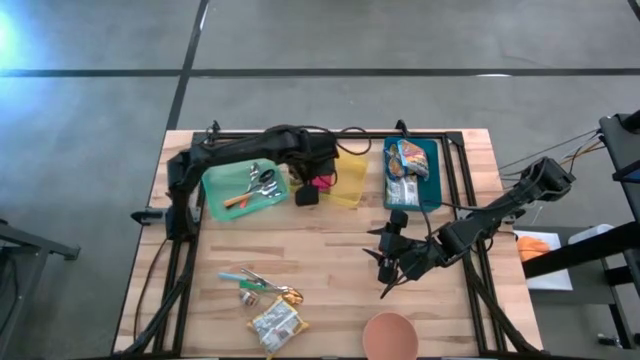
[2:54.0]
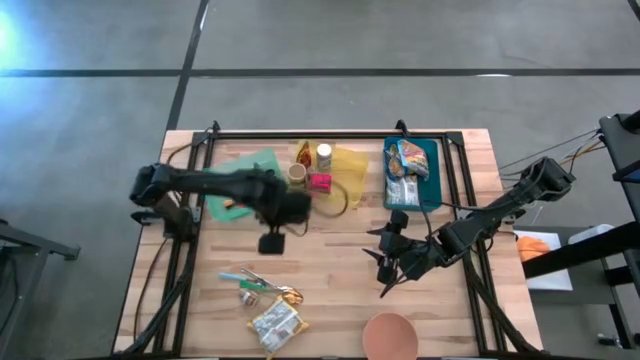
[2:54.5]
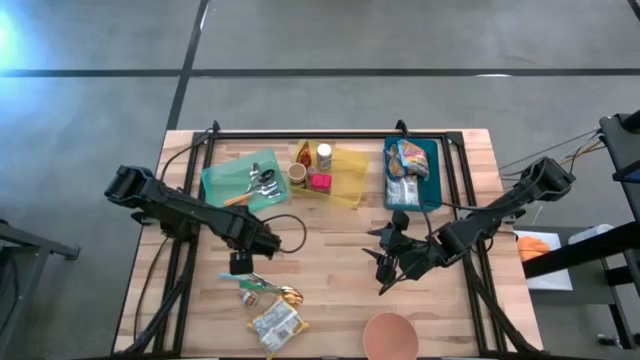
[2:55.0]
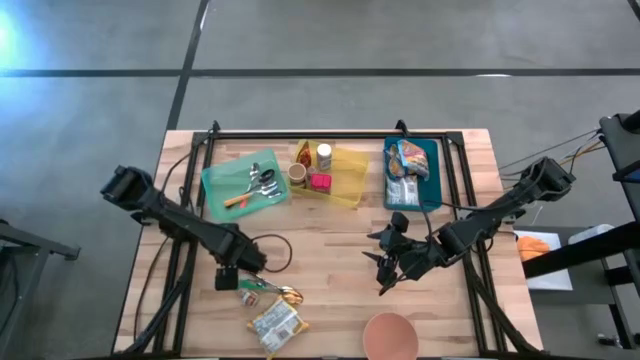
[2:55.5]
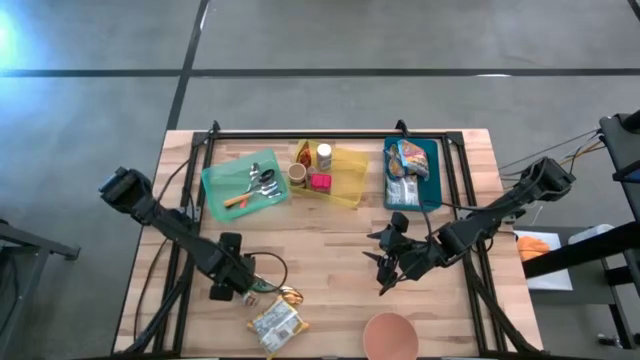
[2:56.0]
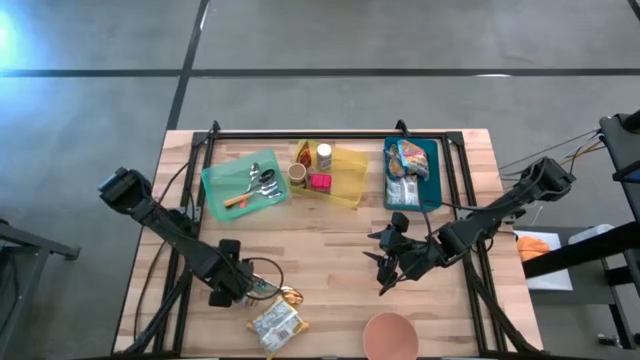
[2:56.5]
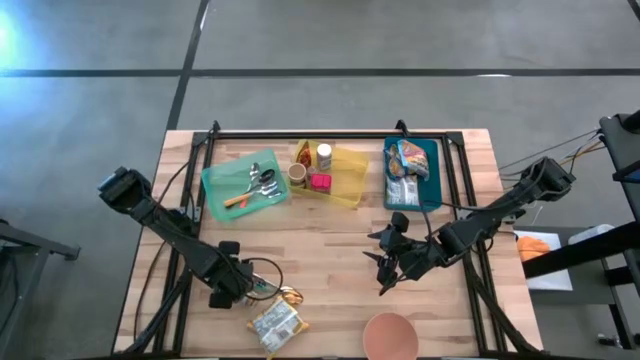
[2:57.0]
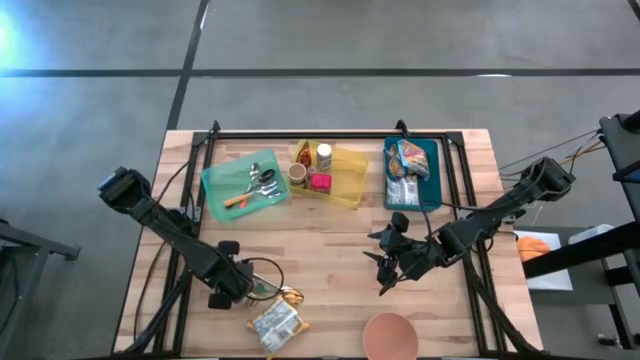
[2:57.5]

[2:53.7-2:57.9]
Put the blue spoon into the green bin

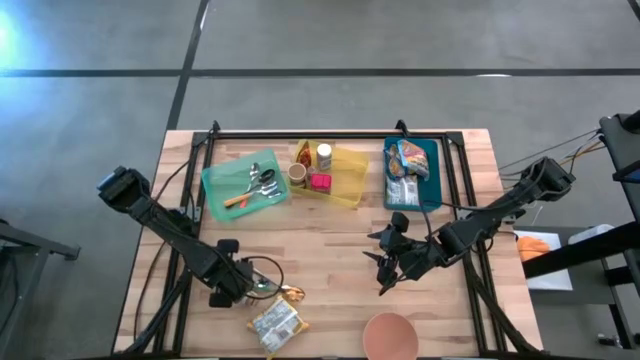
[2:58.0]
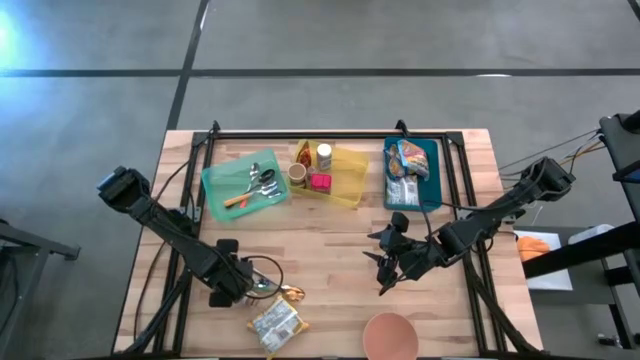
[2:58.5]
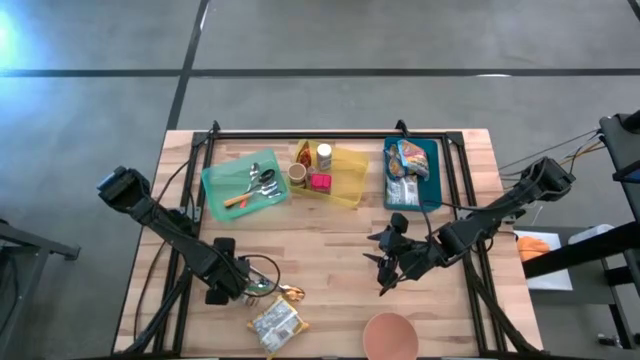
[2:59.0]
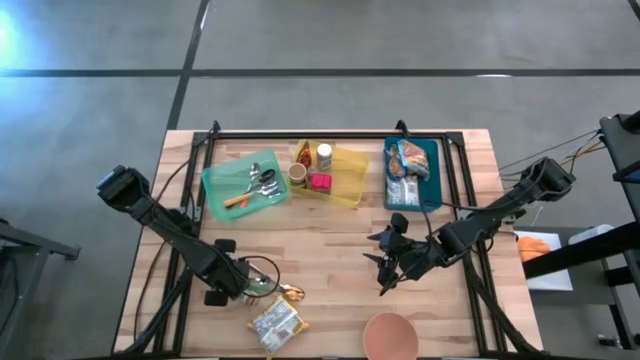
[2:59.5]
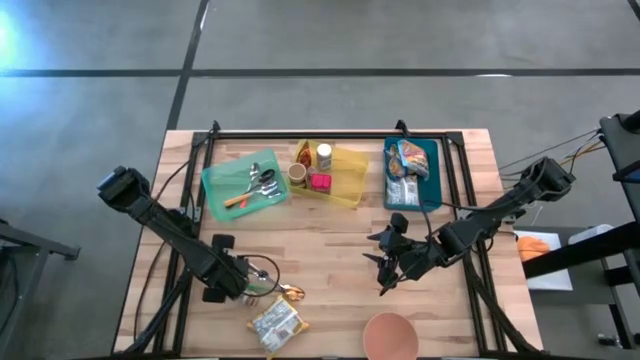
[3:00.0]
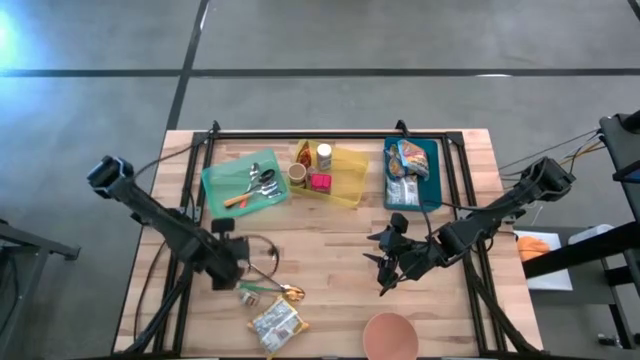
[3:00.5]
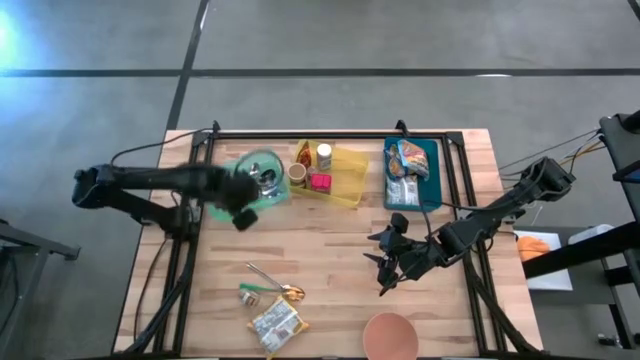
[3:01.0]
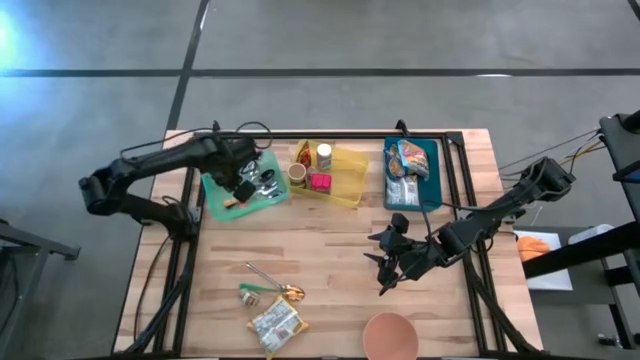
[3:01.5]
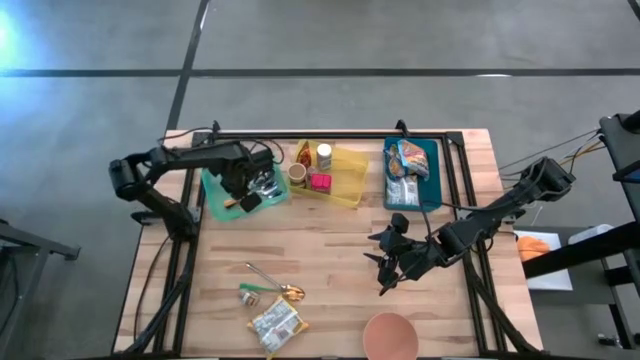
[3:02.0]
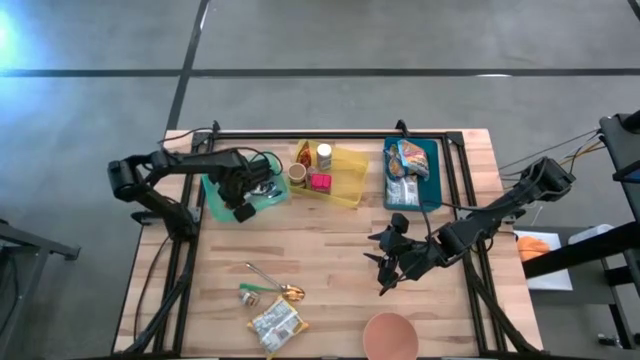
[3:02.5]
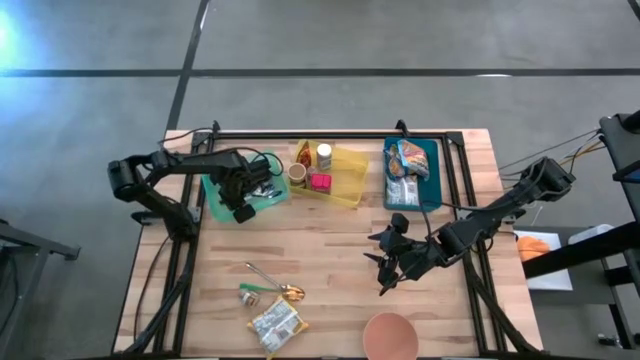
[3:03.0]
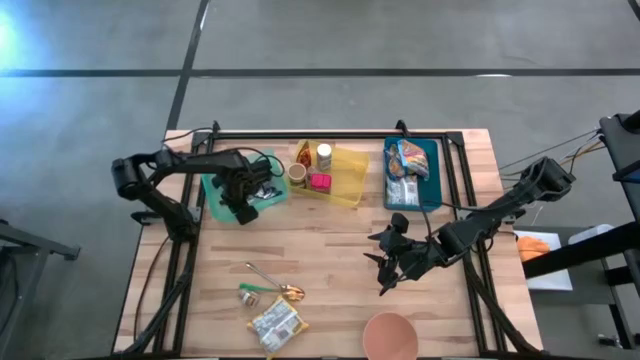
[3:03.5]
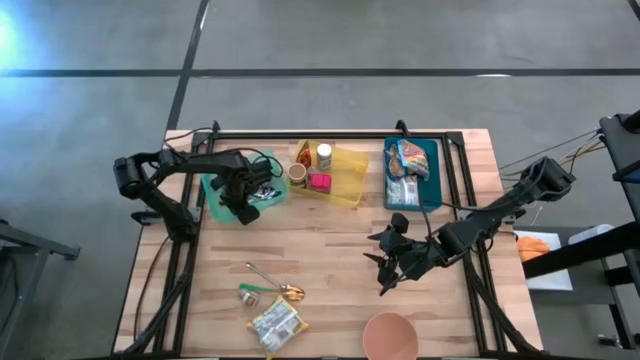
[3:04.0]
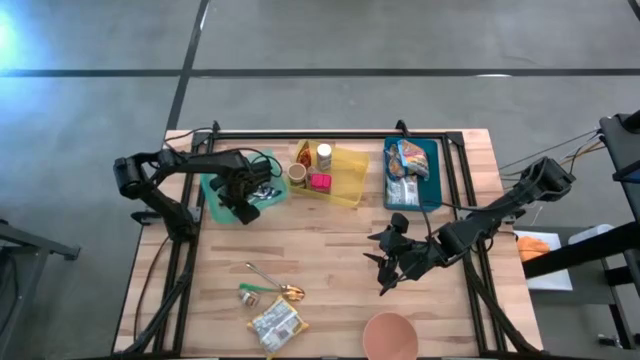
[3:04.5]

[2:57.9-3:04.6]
Put the blue spoon into the green bin

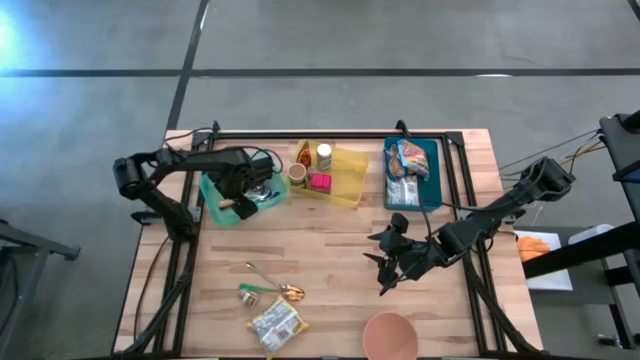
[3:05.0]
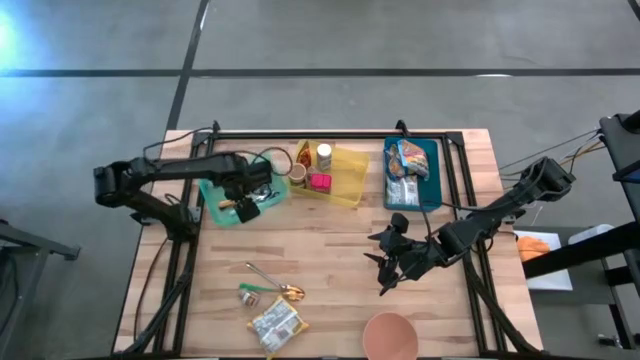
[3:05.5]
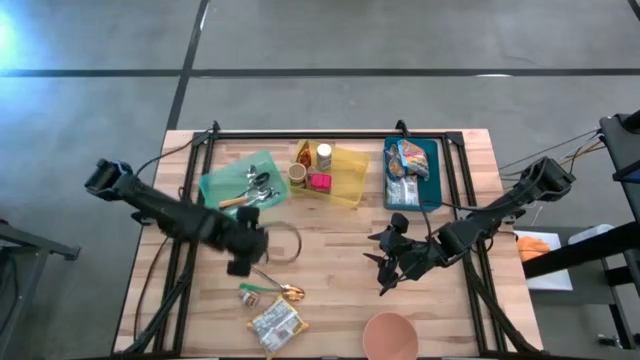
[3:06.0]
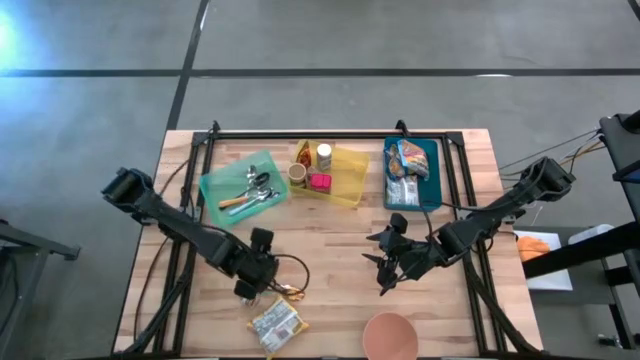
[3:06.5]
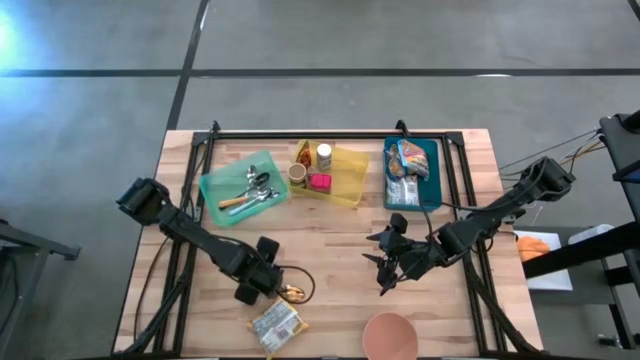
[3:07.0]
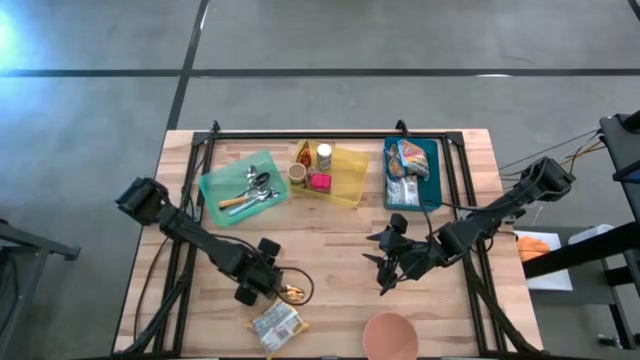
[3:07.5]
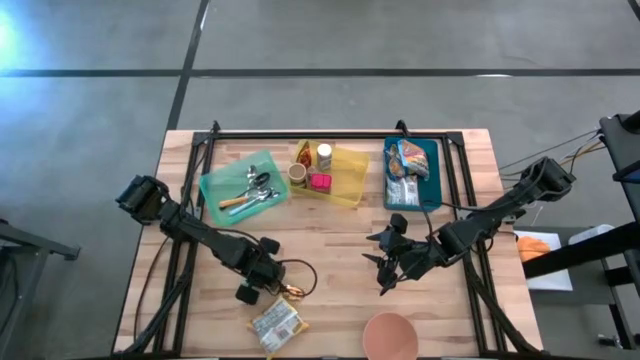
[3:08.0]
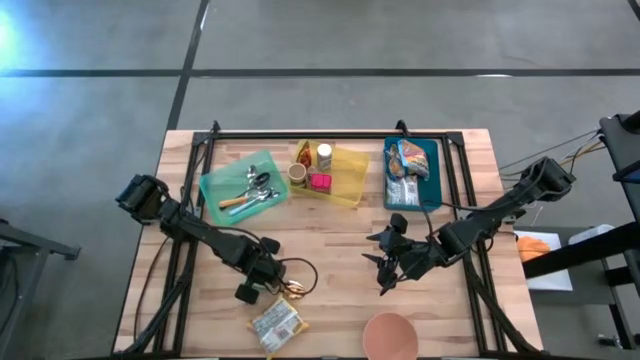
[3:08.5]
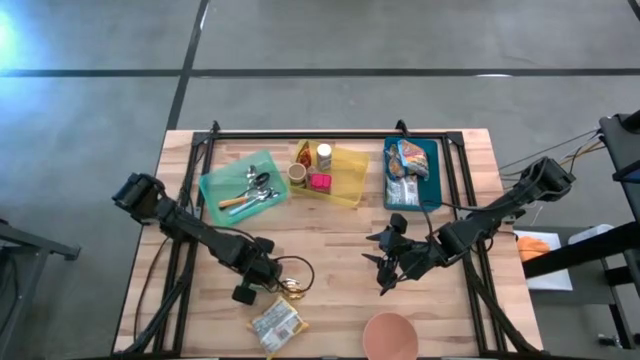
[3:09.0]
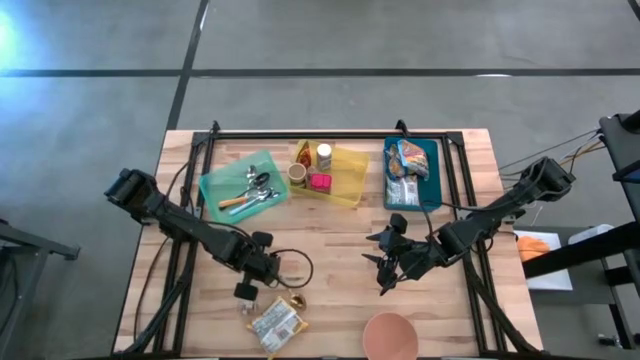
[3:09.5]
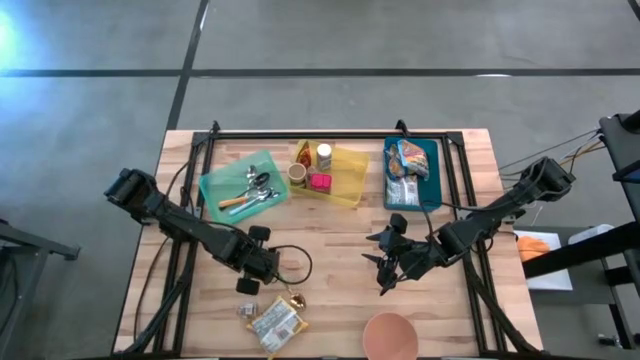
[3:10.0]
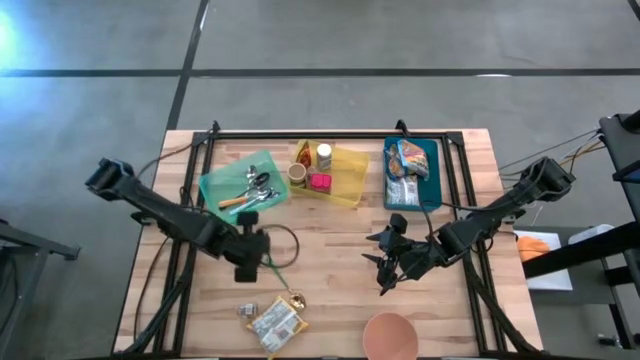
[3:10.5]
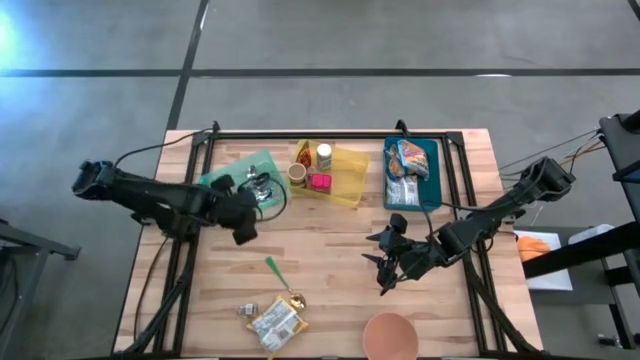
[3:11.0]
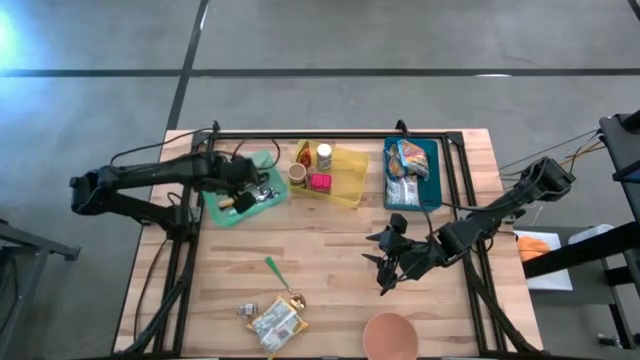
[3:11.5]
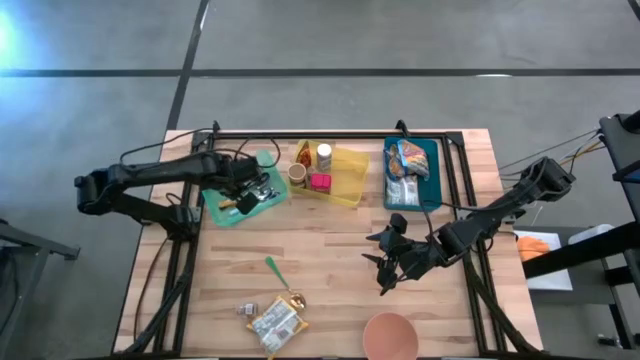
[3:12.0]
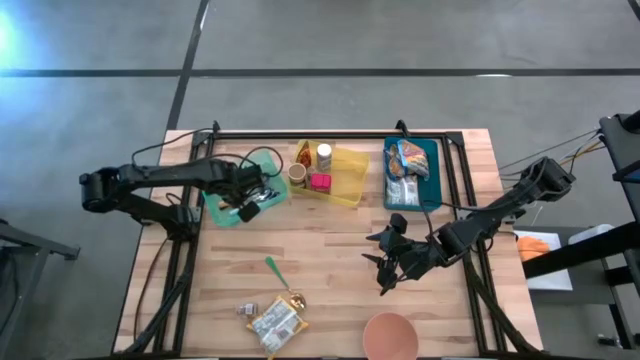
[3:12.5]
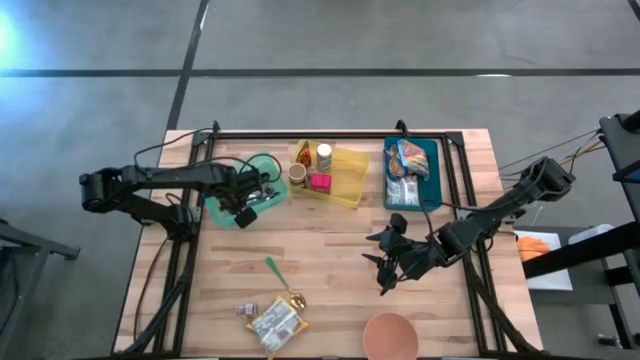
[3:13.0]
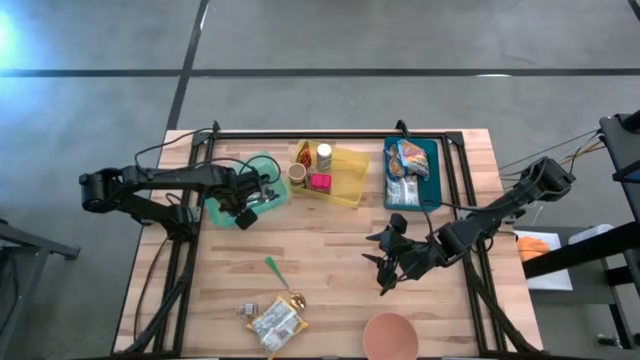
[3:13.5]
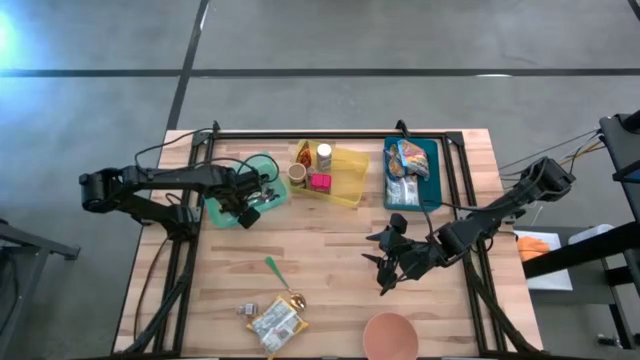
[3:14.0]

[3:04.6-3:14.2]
Put the silver spoon into the green bin
